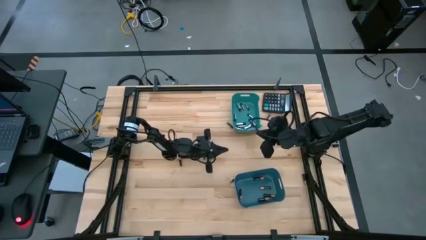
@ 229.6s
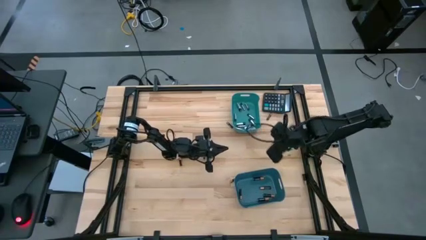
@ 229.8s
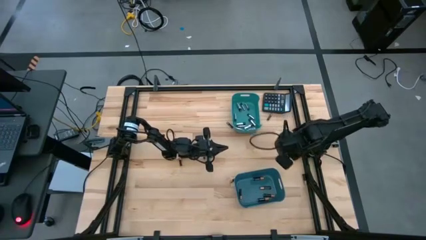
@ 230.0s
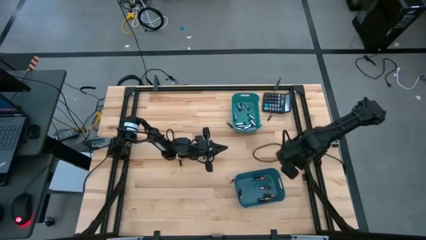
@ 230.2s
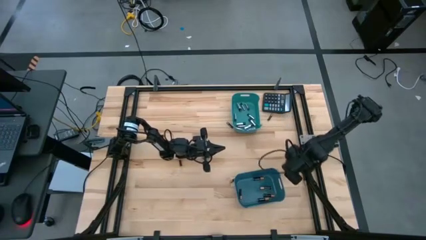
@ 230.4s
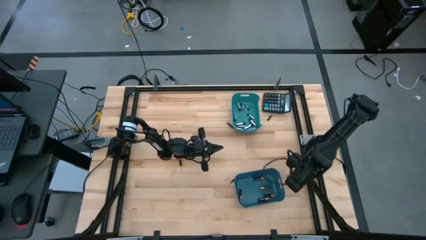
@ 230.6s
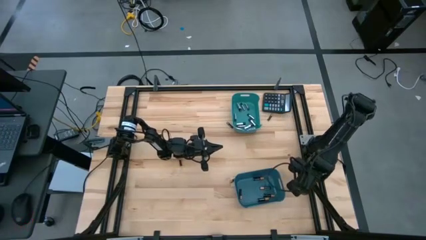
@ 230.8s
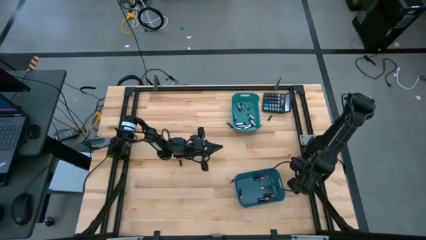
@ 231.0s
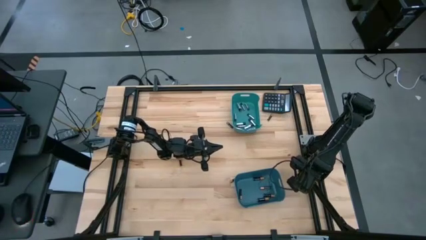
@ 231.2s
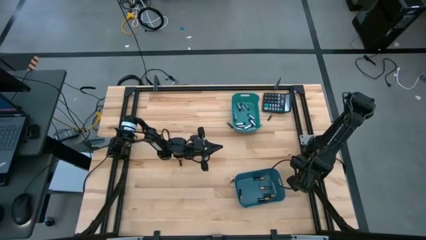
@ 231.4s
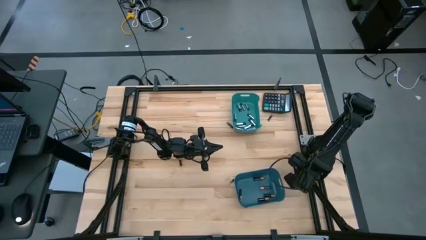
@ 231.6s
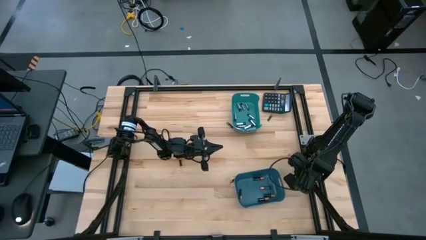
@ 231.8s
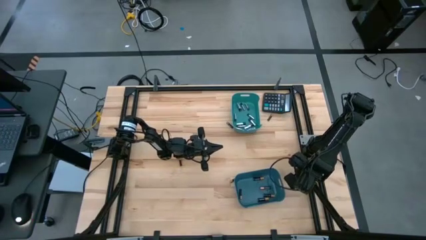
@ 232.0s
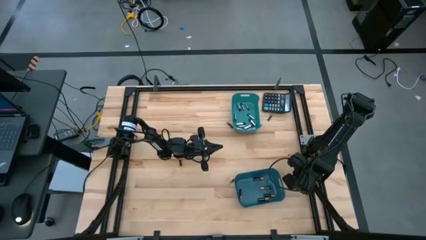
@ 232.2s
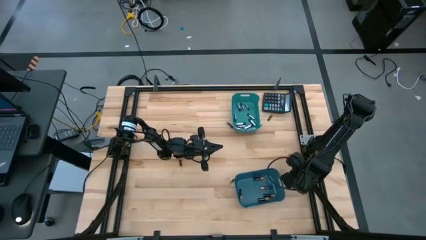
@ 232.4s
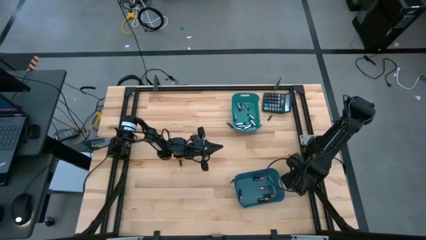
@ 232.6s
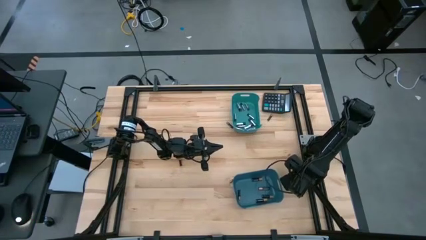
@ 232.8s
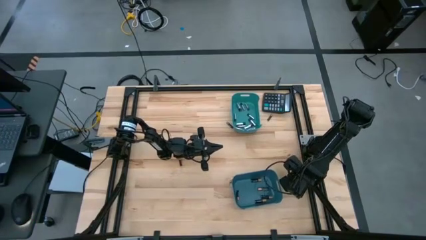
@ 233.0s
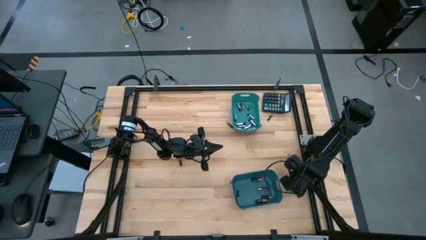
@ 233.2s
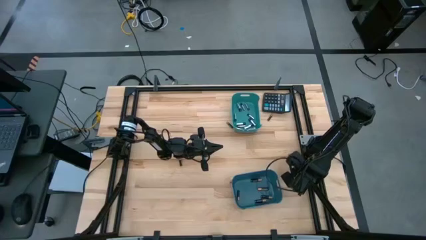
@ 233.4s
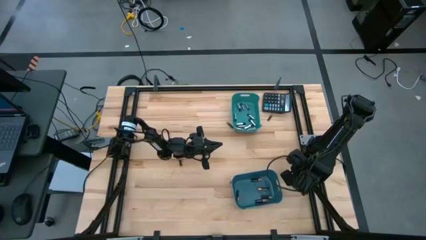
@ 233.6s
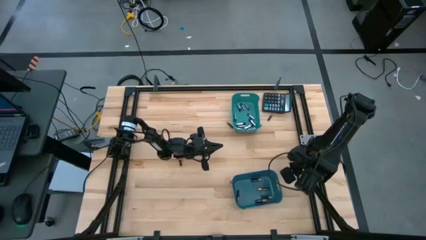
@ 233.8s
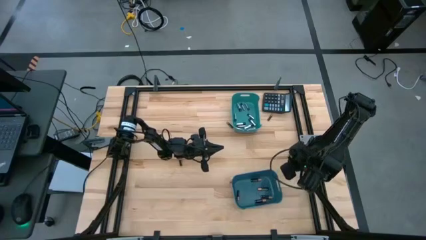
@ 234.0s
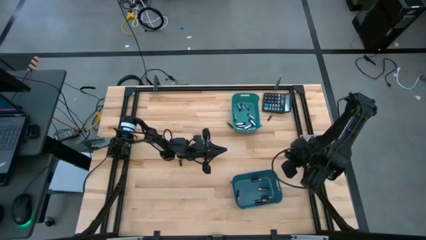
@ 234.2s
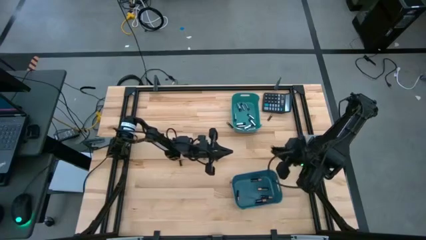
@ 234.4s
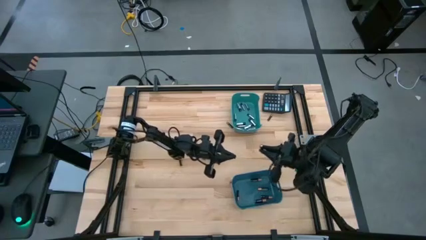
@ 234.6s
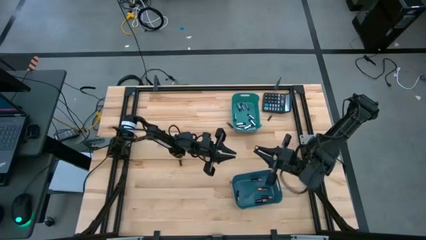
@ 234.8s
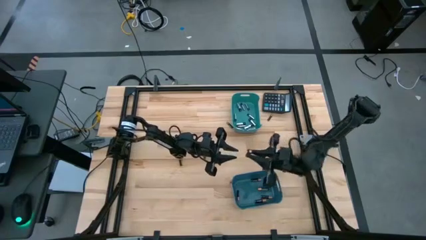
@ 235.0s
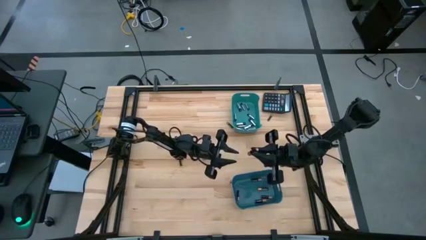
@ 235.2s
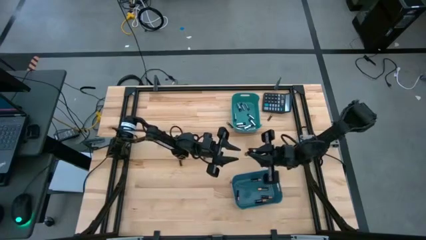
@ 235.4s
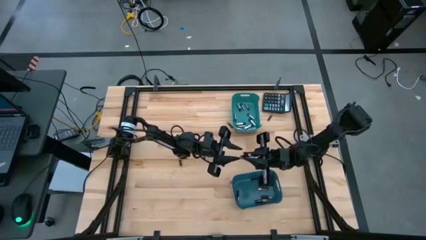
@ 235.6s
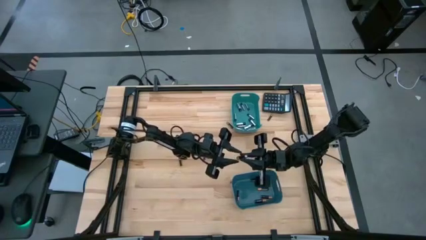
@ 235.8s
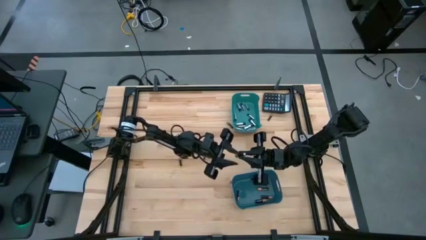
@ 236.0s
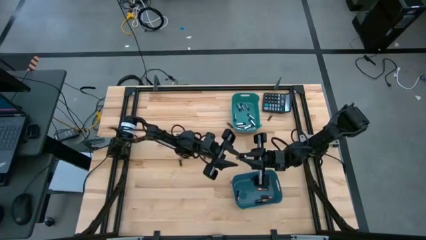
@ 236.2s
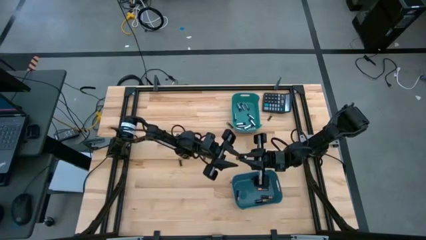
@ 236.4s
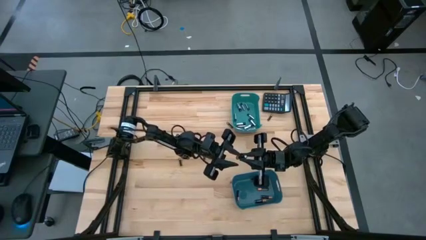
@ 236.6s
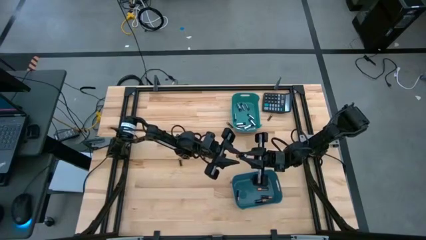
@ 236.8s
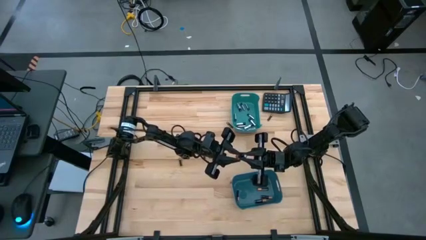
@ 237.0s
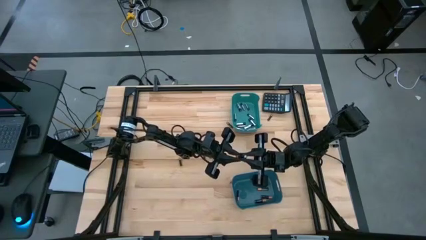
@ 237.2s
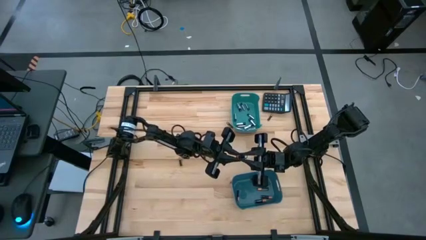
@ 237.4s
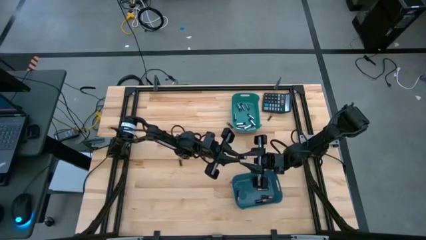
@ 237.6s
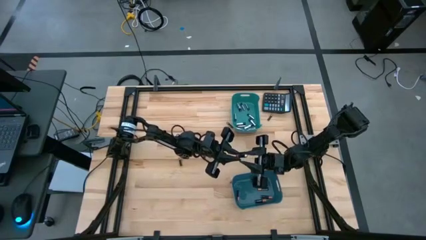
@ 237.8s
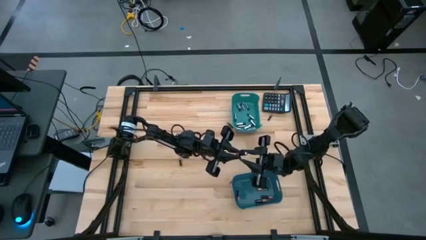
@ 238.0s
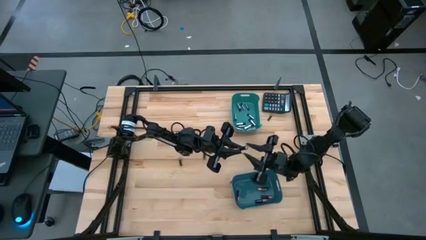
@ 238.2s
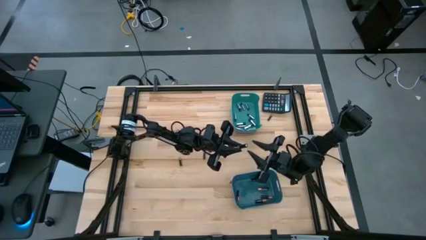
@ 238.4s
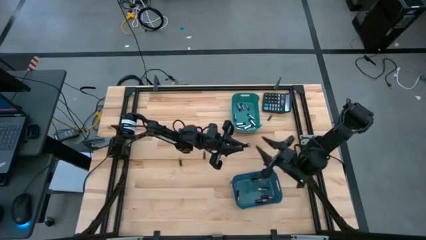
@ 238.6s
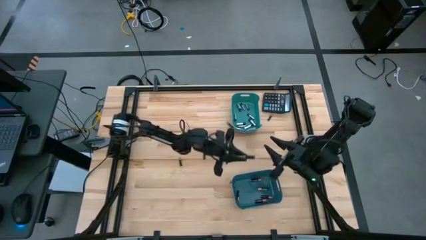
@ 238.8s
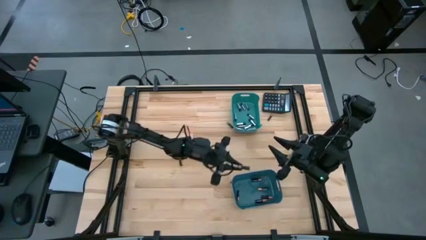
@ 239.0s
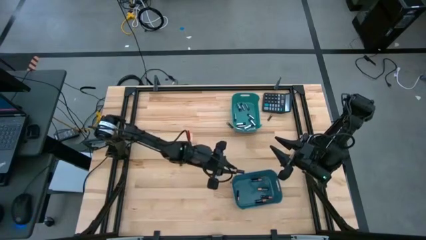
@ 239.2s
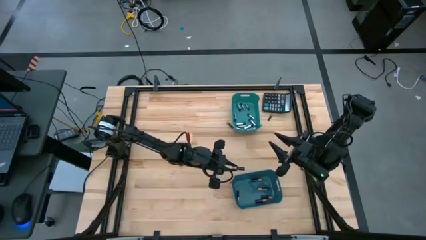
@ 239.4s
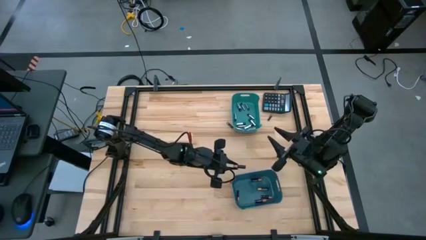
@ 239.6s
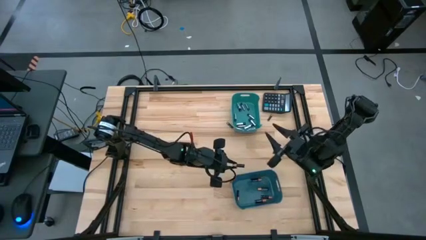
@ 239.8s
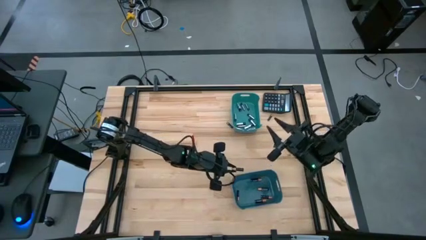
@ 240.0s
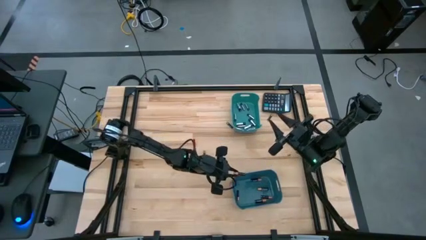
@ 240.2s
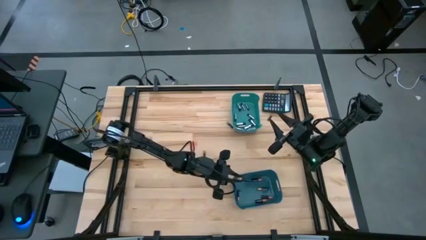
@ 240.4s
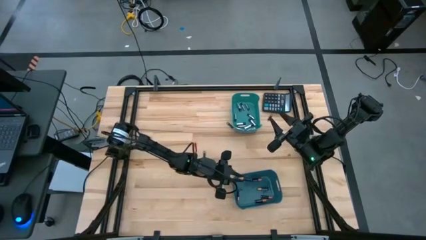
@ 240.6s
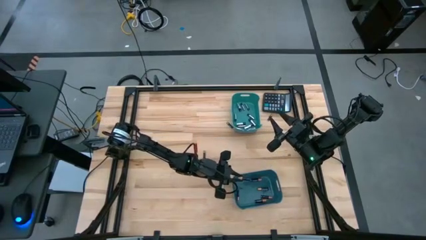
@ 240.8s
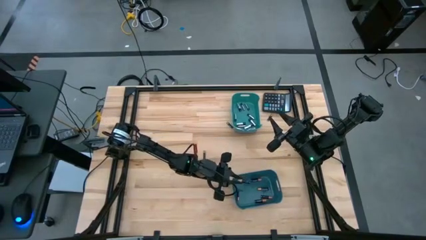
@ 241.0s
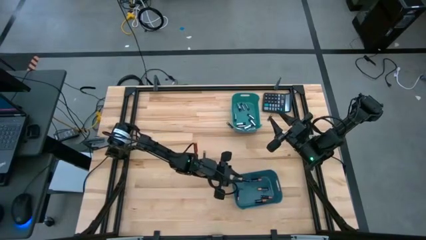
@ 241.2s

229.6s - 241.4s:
Task: Sort batteries
Put the black battery into the blue bin

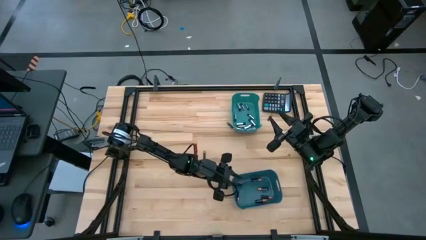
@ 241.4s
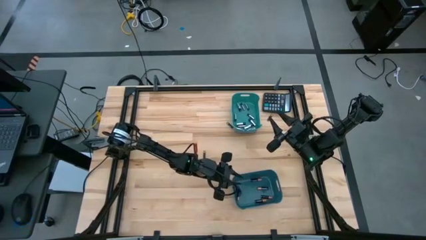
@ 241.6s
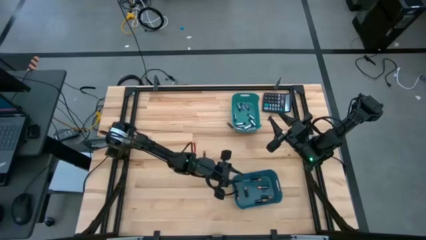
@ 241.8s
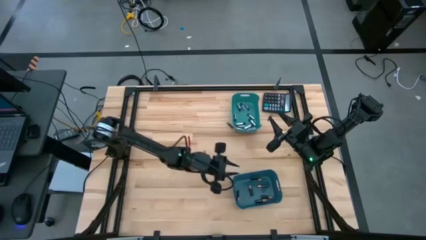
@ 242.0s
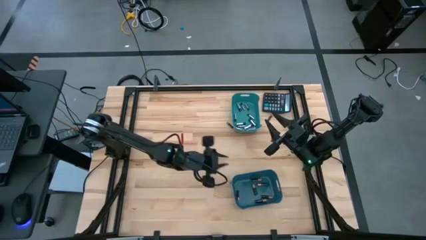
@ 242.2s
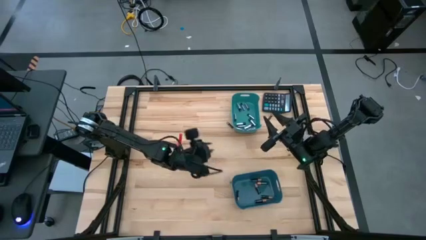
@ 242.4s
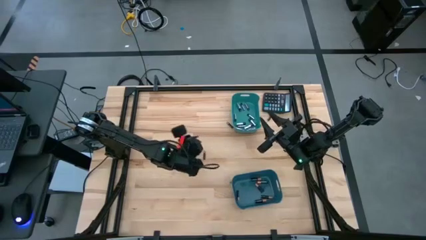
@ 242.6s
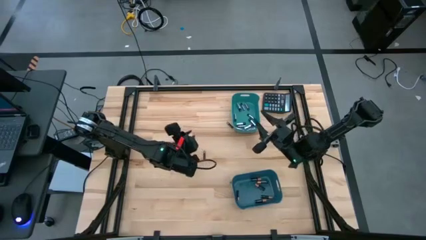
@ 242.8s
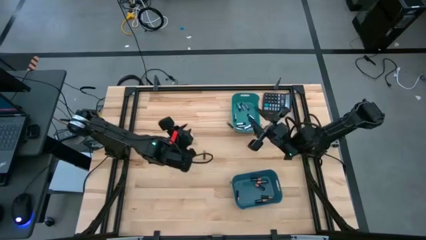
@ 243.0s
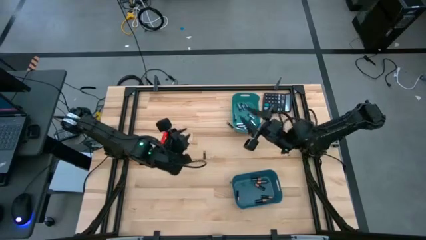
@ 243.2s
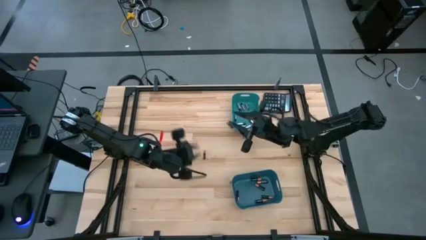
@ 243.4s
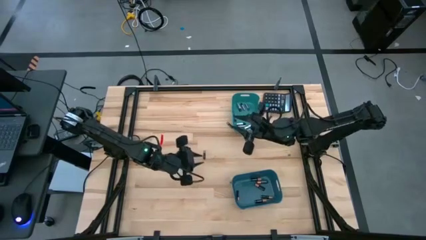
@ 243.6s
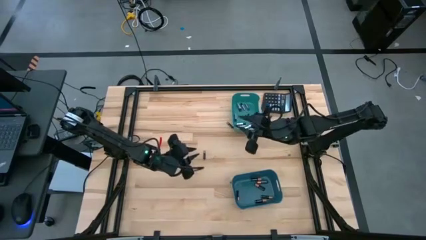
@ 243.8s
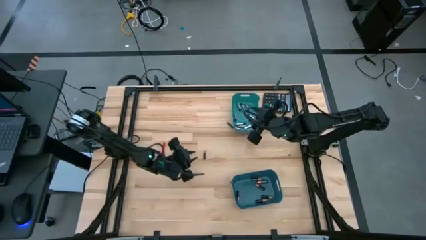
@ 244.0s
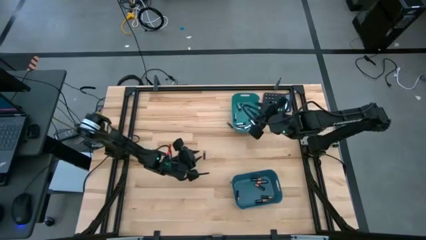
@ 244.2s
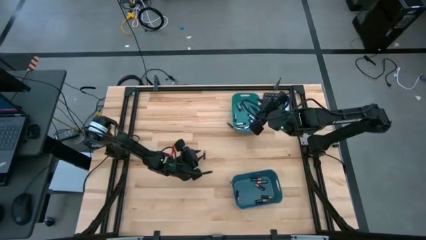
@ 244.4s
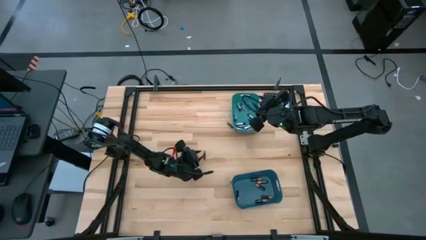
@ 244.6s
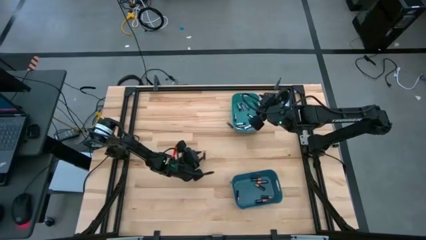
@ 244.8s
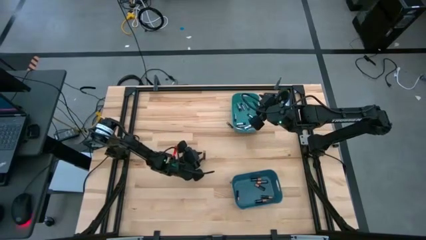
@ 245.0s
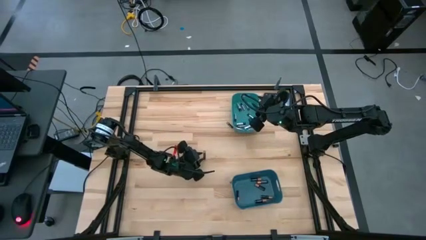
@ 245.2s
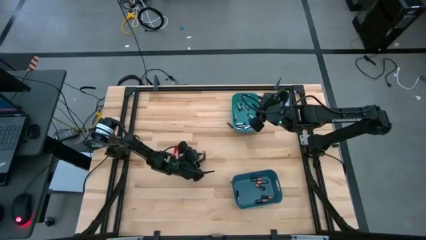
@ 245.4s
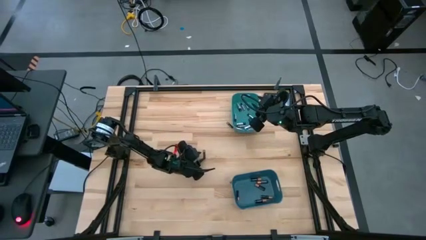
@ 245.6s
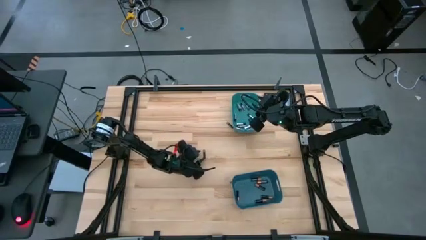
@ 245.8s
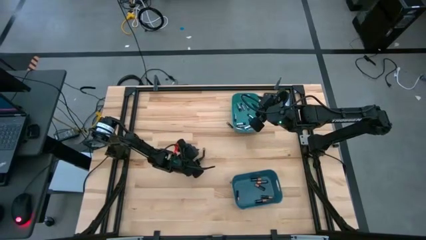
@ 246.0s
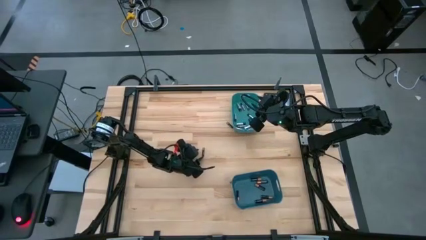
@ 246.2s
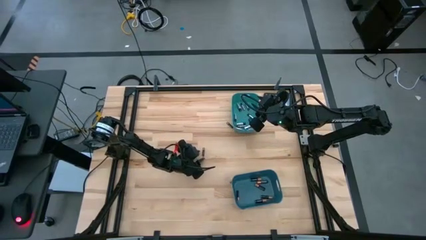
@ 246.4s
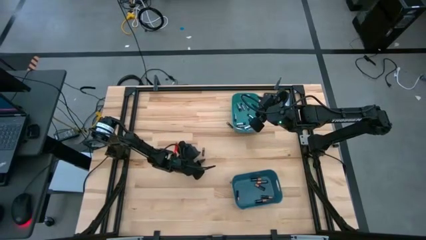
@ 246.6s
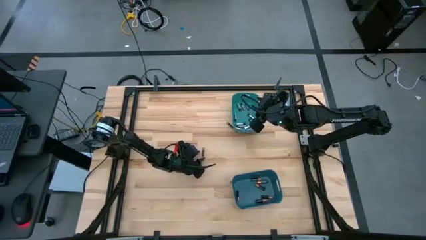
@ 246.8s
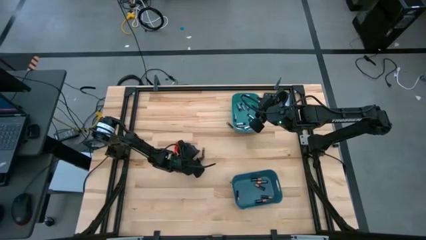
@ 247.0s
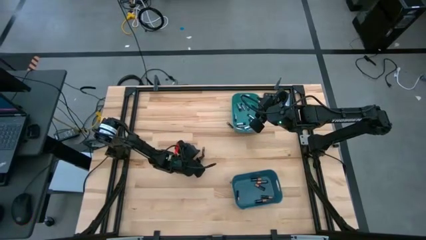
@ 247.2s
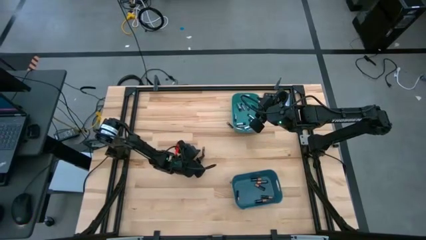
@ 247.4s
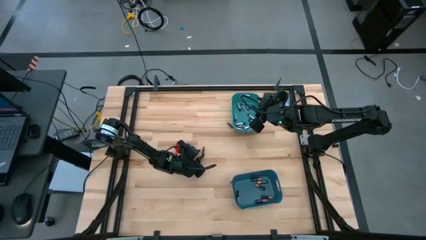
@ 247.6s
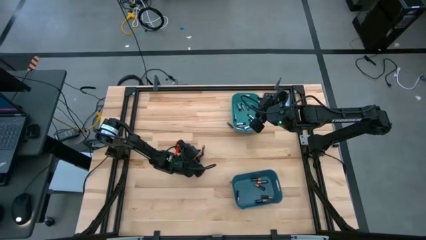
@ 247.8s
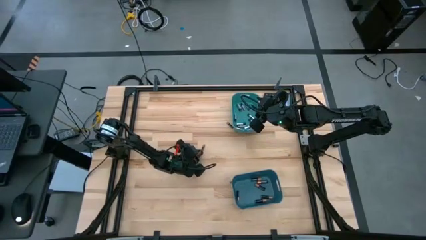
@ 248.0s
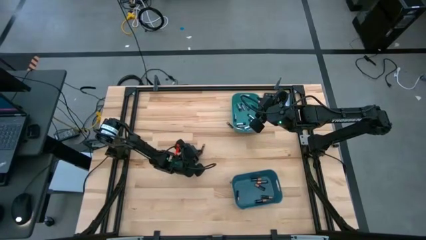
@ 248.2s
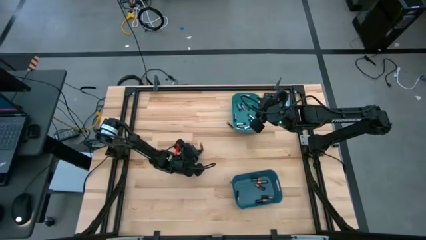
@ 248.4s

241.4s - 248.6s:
Put the black battery into the blue bin
